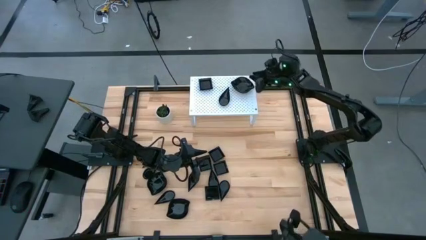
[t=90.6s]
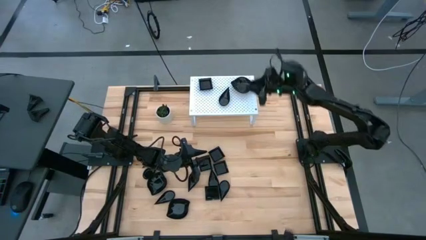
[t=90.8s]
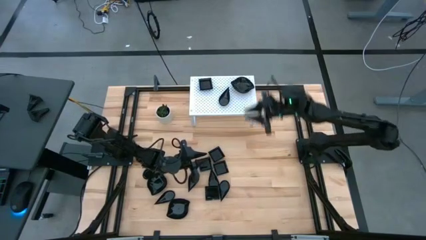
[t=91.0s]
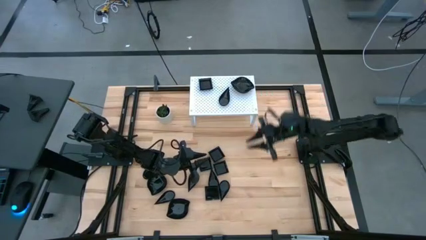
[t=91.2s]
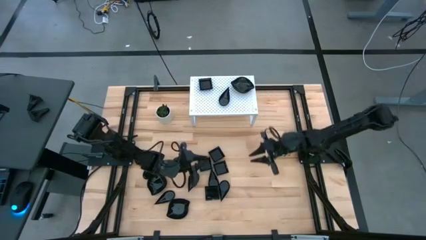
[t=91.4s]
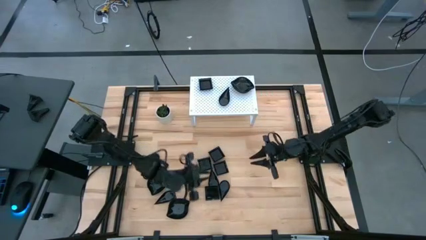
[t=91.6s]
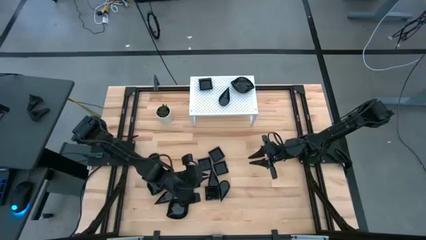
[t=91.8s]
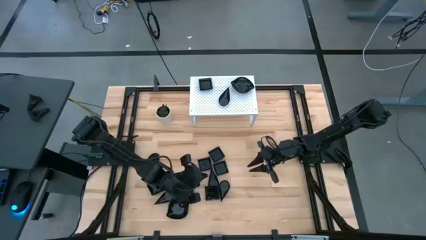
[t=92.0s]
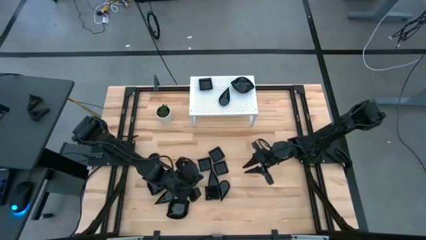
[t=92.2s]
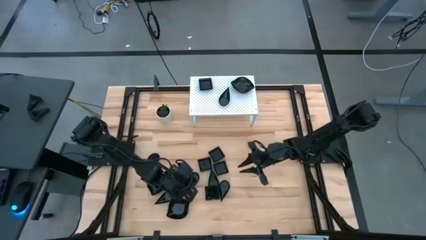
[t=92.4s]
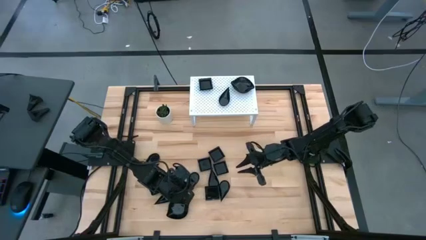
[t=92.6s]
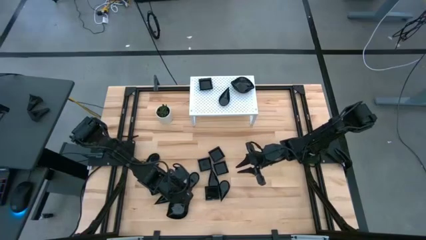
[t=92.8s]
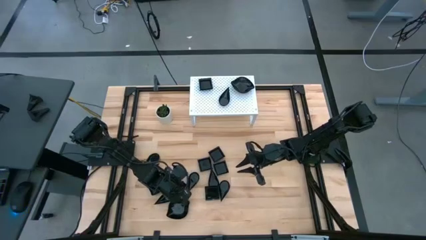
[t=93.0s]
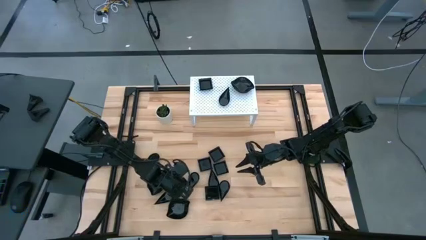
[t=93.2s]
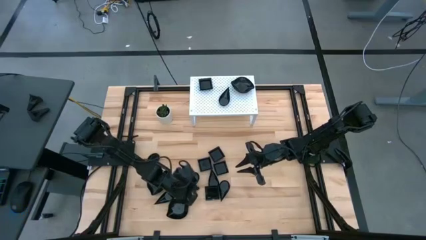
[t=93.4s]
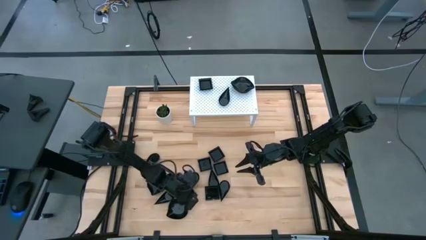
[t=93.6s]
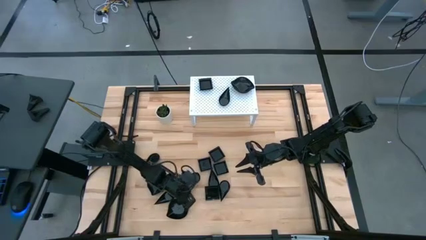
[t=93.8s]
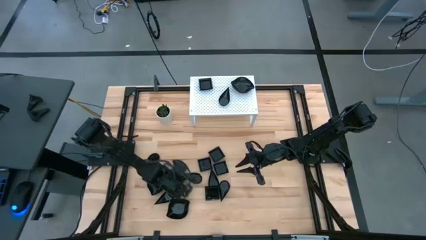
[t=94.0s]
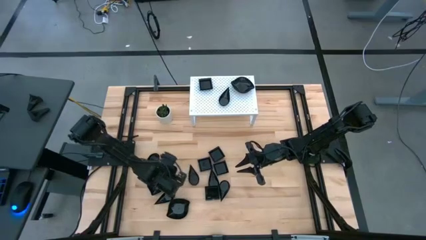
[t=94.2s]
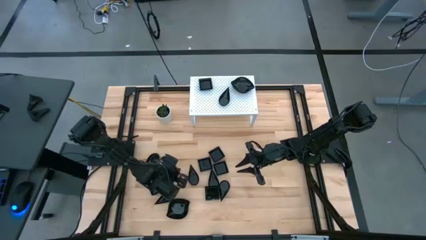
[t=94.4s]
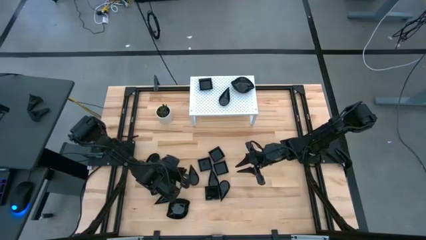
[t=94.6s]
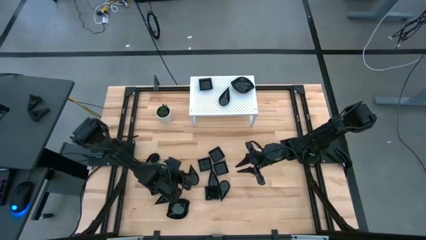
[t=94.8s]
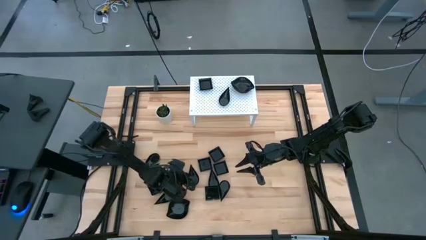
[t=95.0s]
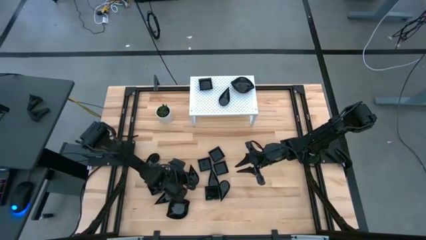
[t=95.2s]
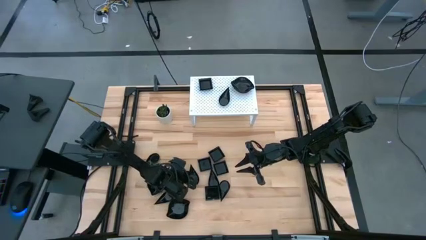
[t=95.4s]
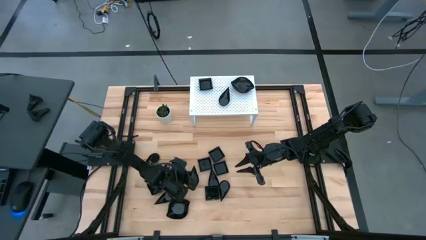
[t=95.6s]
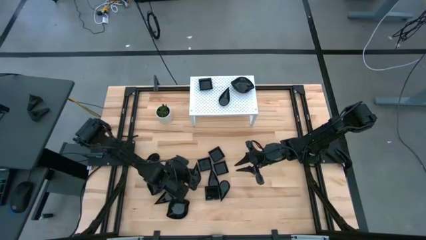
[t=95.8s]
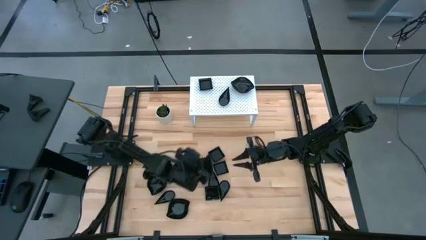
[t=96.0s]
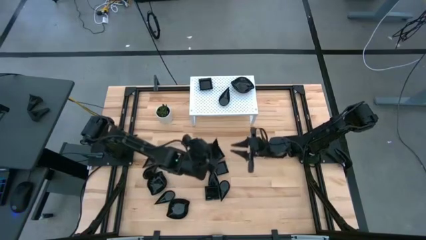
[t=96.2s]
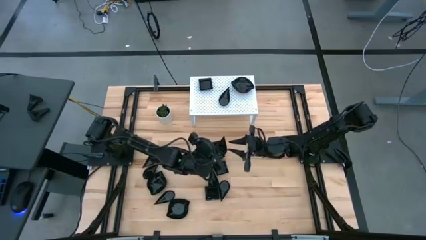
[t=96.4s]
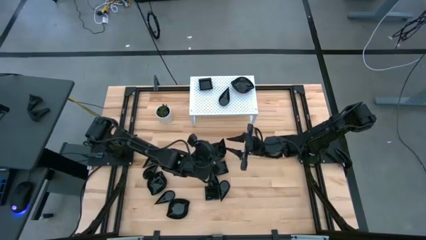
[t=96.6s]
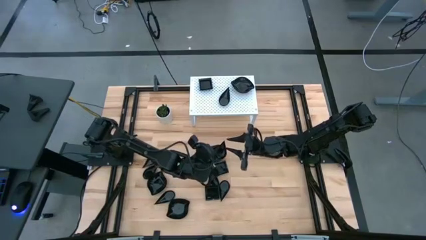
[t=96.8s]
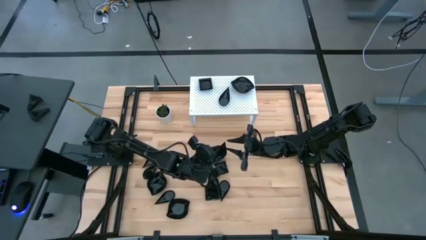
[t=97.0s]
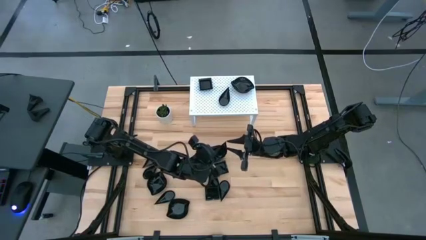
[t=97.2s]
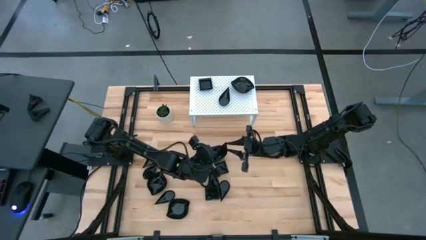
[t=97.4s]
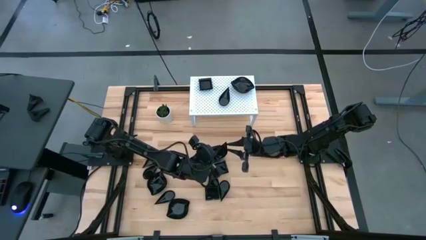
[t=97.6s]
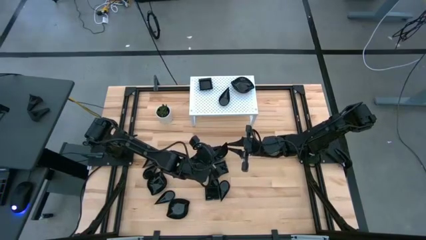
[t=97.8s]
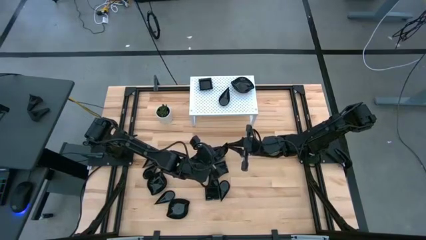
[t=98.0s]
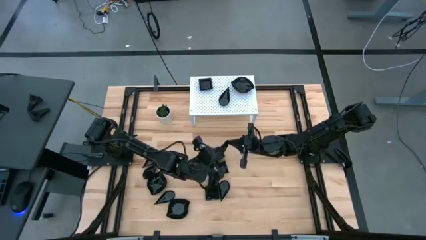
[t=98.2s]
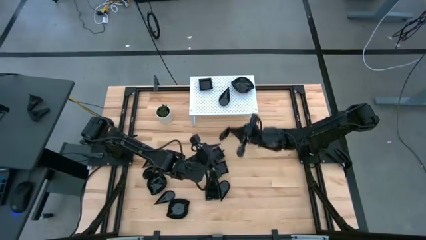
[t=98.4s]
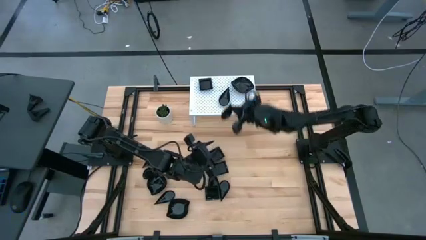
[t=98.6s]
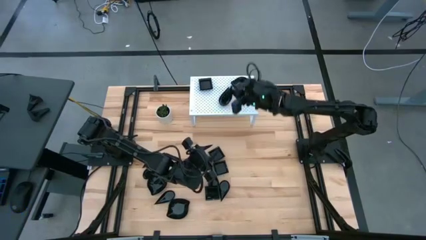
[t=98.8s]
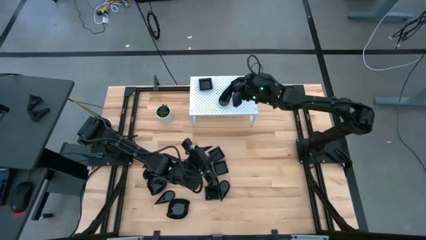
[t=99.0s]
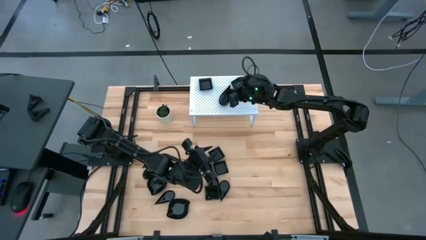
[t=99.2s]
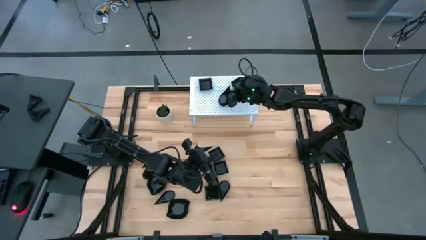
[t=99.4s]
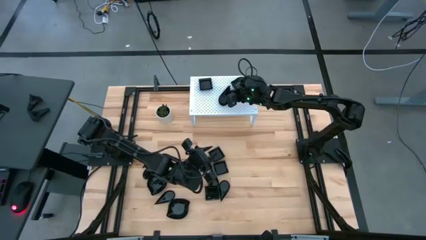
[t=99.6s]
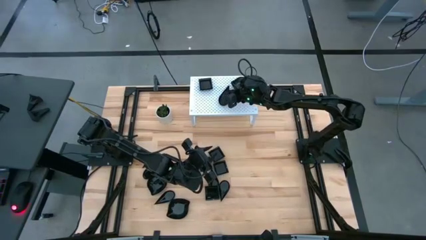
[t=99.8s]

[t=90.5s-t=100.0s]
Task: Pick & Place Mini shaped plates
Stack the black plate on top of the black plate on the shelf

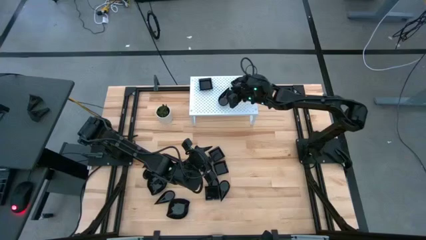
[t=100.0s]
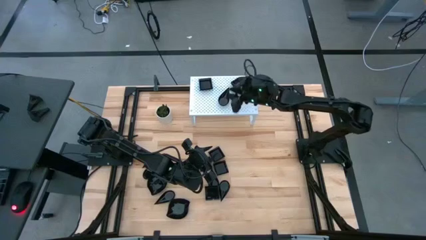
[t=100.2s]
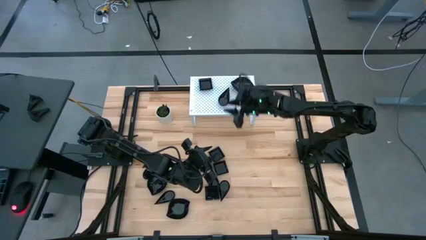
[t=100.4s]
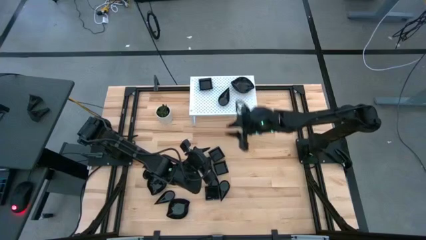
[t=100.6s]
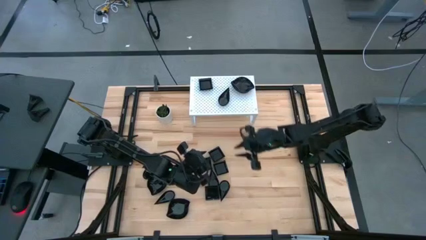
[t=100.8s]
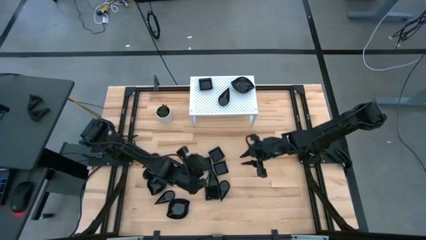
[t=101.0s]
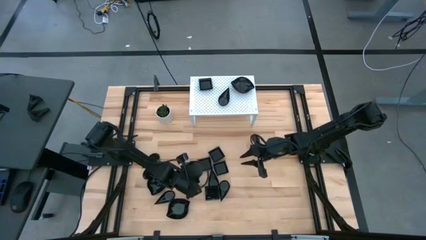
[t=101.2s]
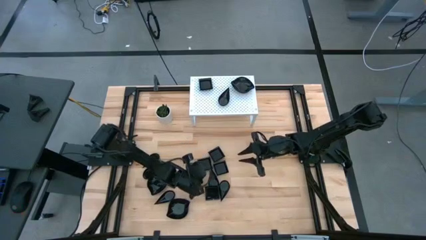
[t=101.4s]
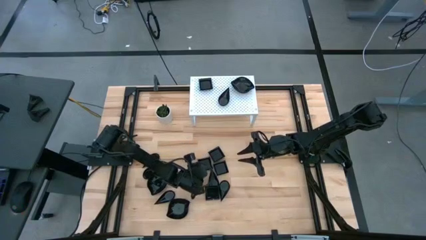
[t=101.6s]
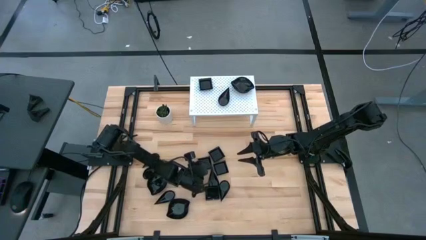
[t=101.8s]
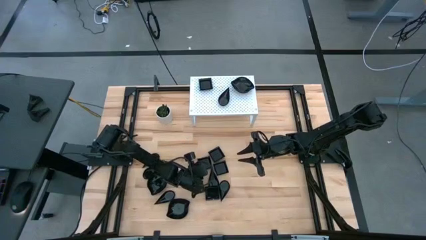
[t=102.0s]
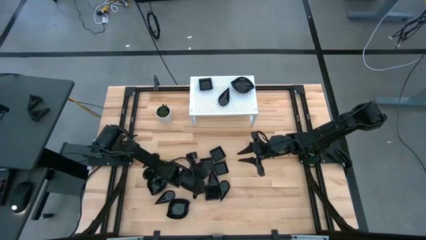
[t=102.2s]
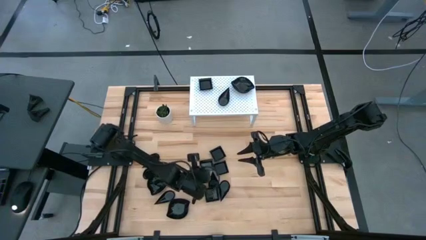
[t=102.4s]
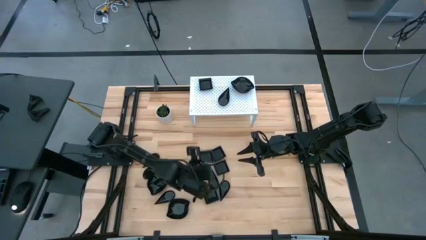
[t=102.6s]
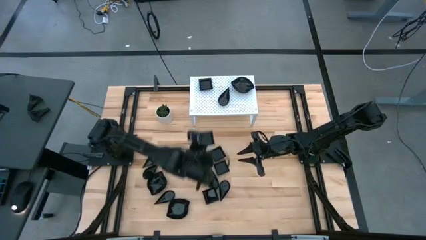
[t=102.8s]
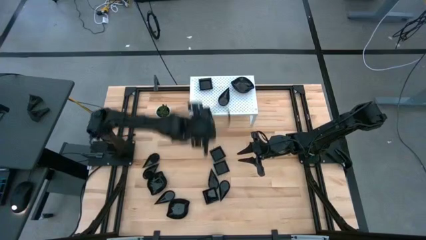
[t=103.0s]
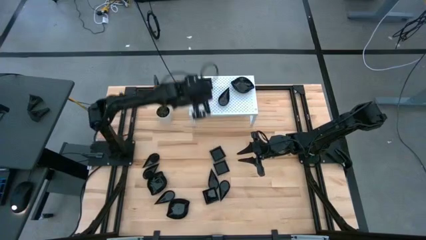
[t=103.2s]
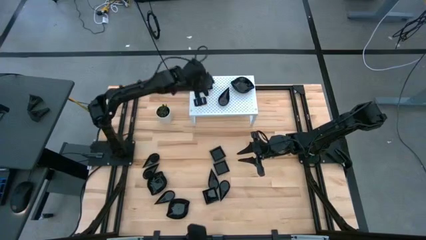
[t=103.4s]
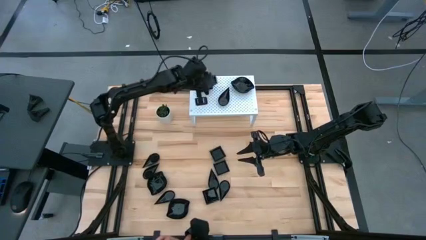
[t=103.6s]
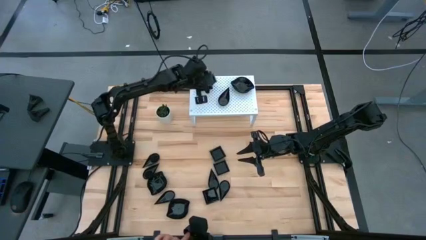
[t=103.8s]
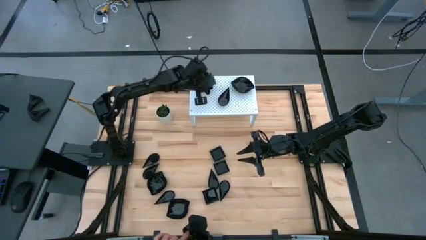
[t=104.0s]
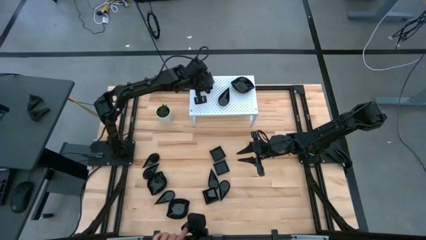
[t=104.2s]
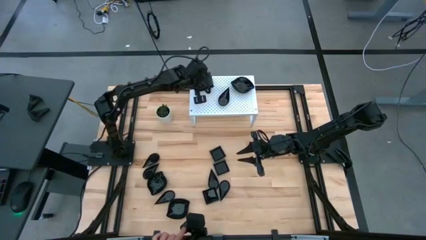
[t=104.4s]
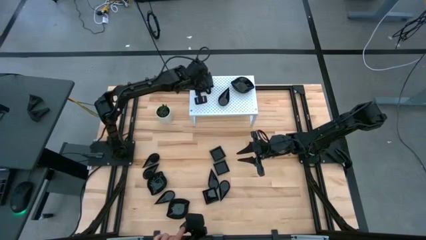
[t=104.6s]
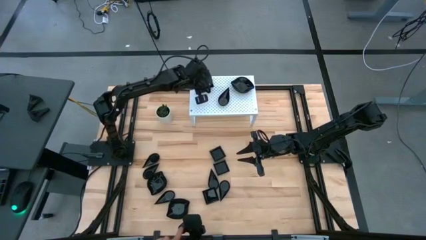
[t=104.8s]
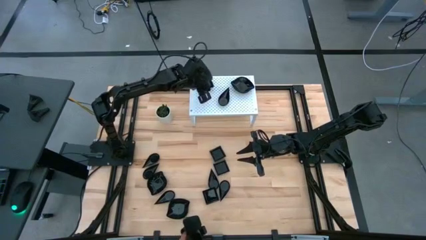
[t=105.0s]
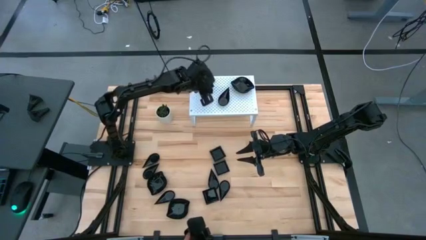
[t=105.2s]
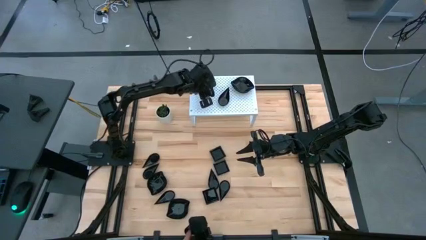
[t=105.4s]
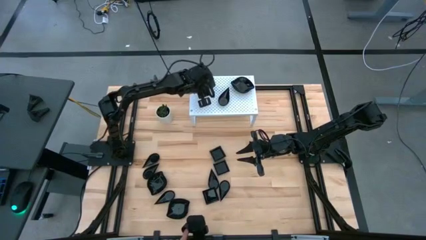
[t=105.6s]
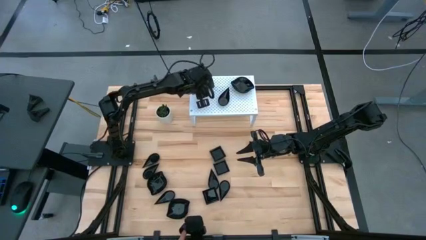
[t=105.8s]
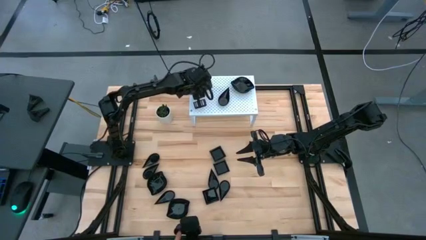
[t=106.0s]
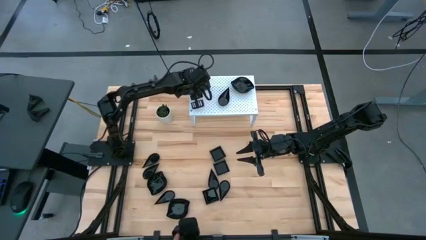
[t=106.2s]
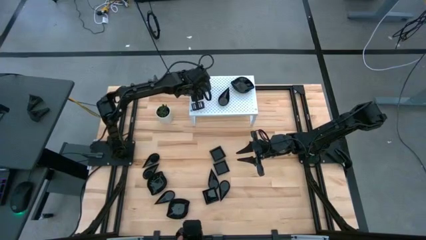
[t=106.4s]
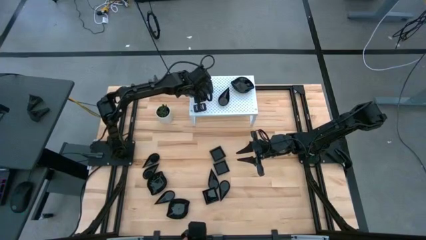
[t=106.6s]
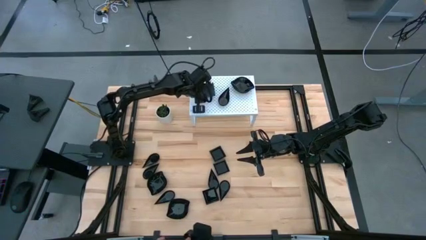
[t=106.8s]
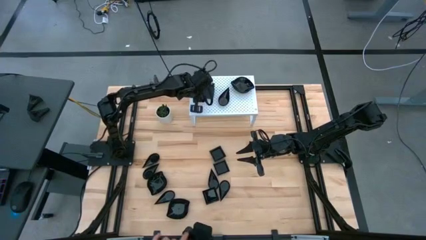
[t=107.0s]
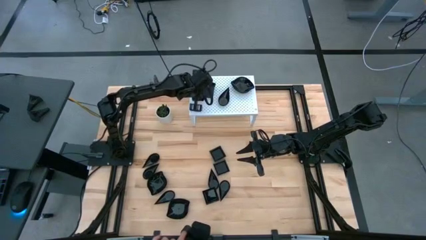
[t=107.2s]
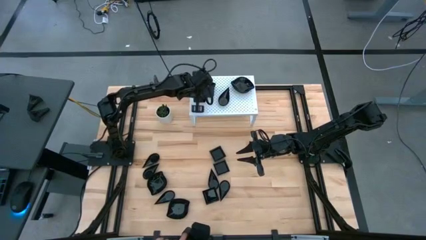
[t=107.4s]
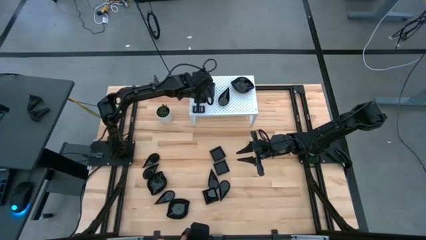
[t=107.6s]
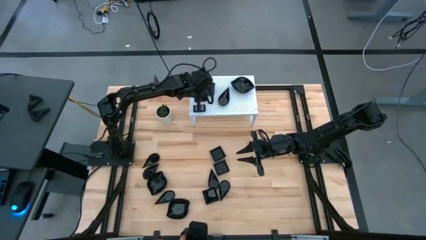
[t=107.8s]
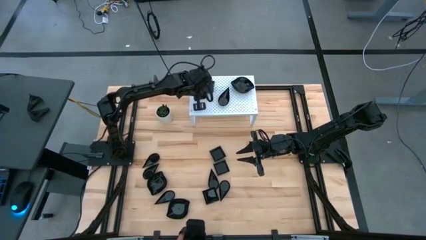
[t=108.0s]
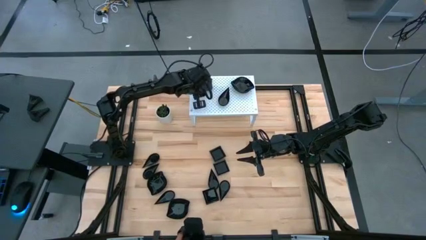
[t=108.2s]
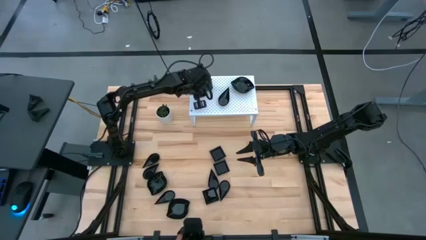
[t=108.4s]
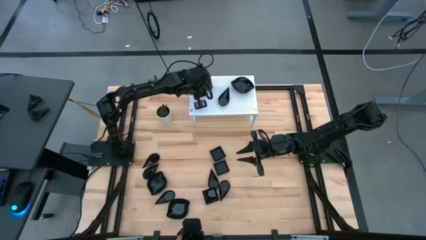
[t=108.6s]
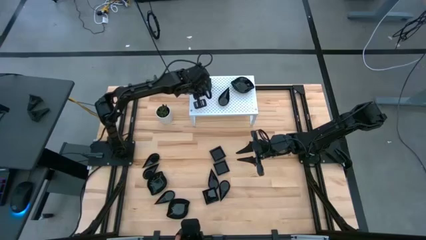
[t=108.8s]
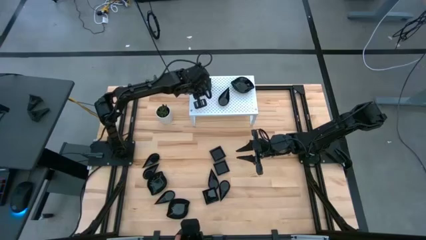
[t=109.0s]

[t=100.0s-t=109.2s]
Stack the black plate on top of the black plate on the shelf
